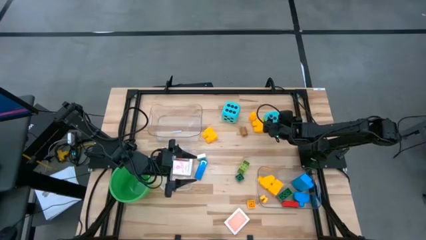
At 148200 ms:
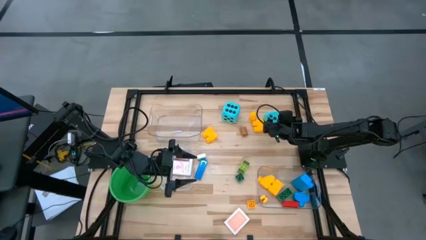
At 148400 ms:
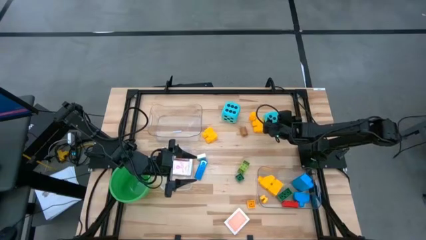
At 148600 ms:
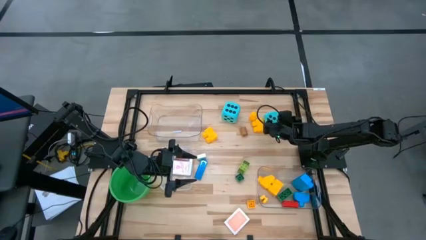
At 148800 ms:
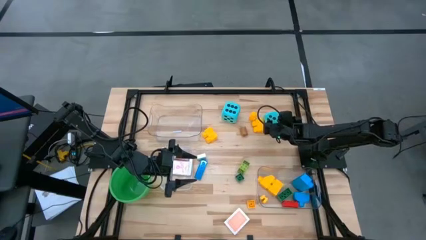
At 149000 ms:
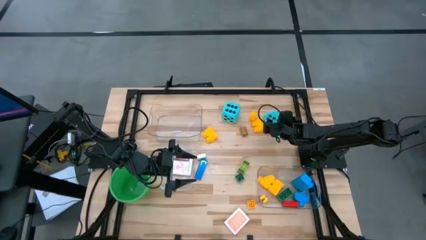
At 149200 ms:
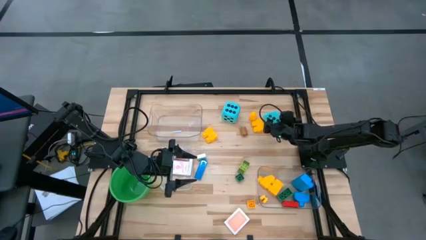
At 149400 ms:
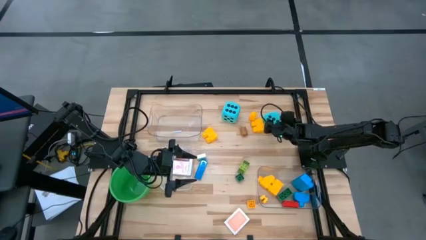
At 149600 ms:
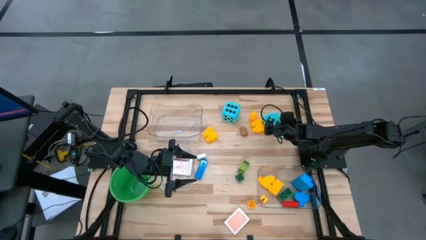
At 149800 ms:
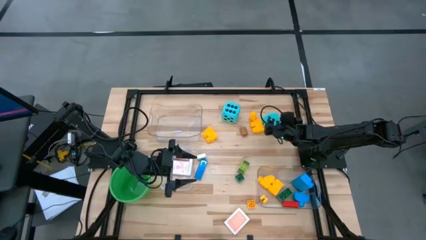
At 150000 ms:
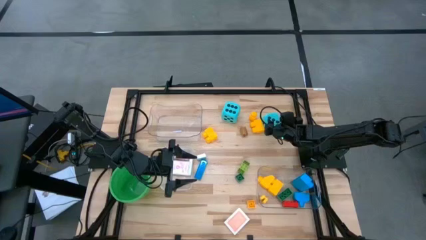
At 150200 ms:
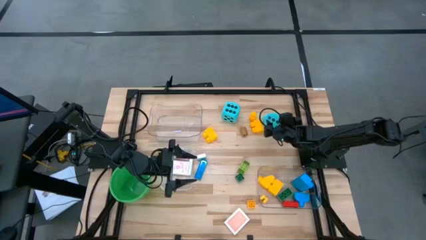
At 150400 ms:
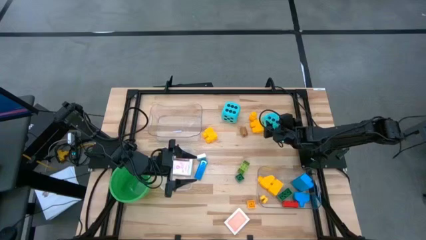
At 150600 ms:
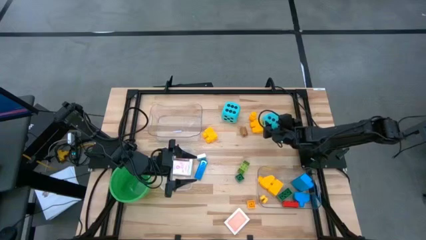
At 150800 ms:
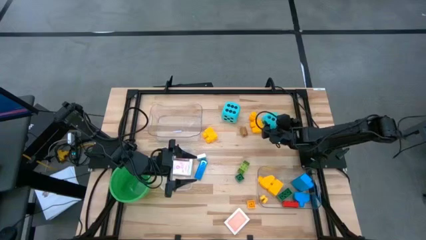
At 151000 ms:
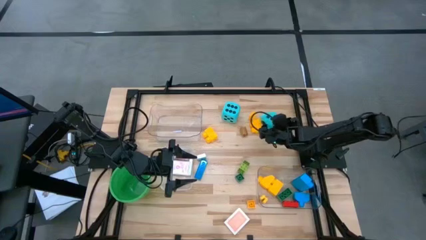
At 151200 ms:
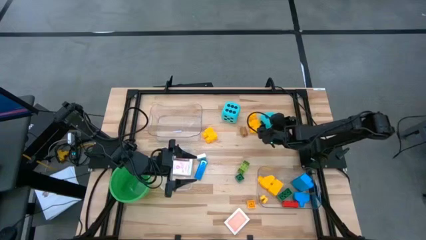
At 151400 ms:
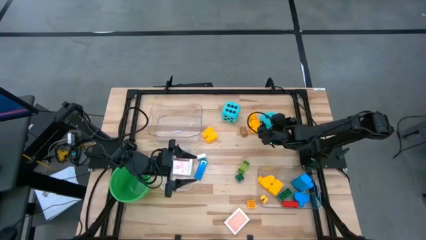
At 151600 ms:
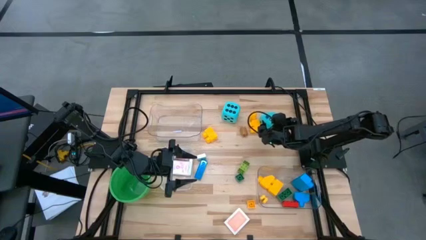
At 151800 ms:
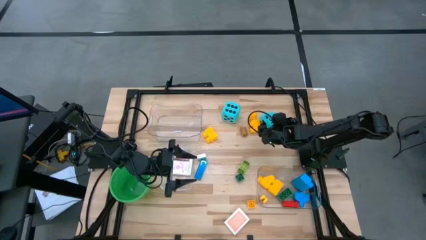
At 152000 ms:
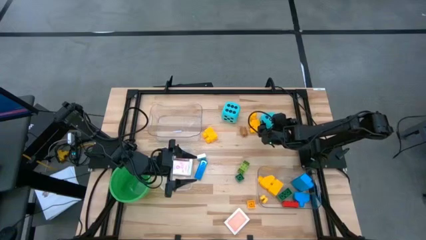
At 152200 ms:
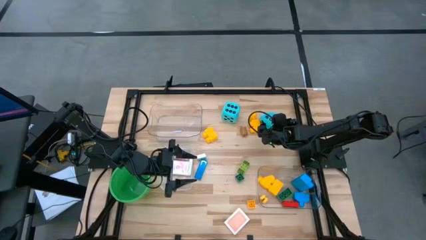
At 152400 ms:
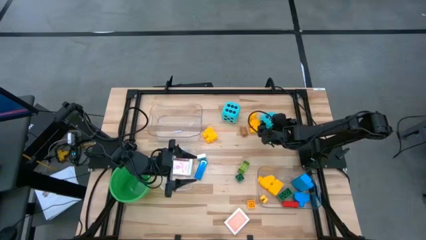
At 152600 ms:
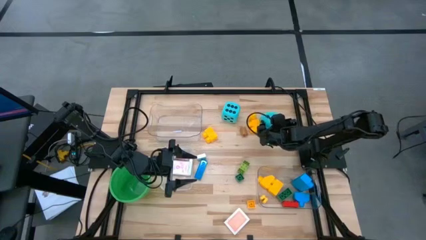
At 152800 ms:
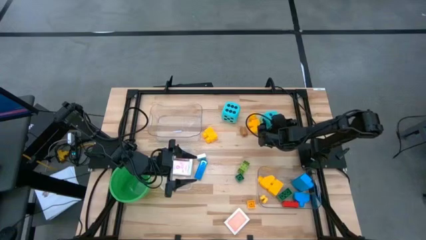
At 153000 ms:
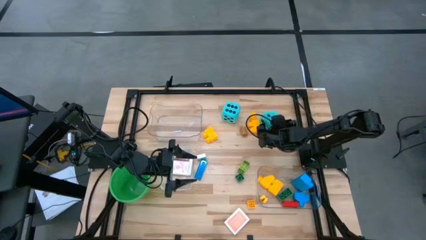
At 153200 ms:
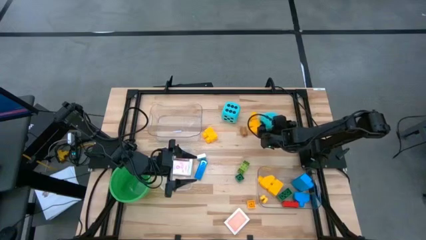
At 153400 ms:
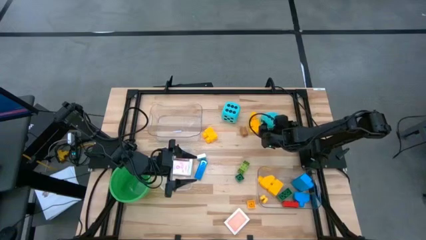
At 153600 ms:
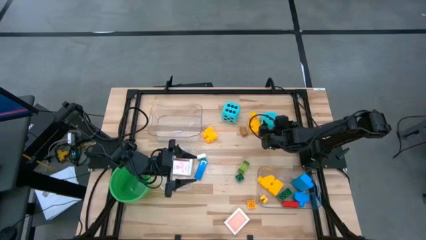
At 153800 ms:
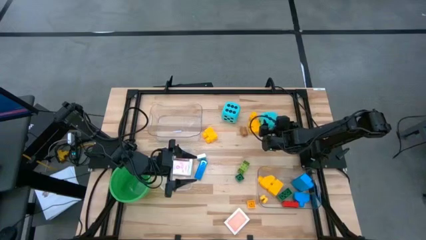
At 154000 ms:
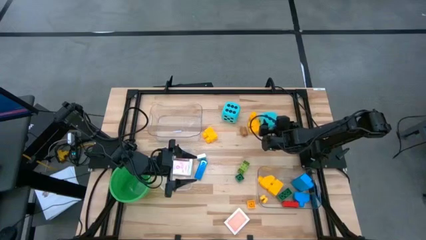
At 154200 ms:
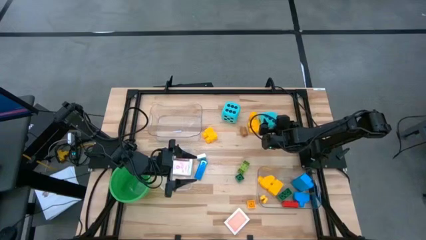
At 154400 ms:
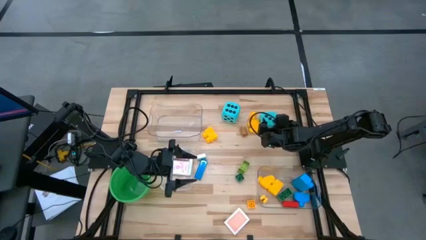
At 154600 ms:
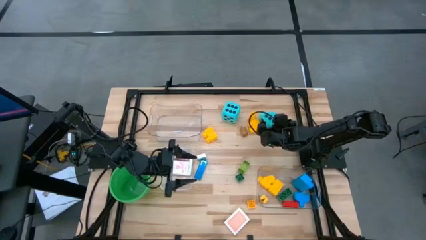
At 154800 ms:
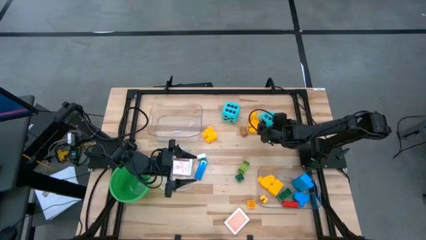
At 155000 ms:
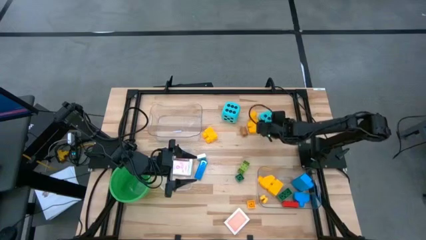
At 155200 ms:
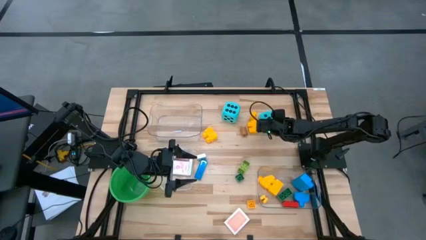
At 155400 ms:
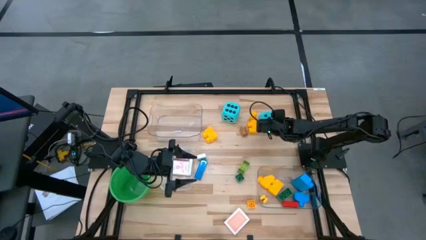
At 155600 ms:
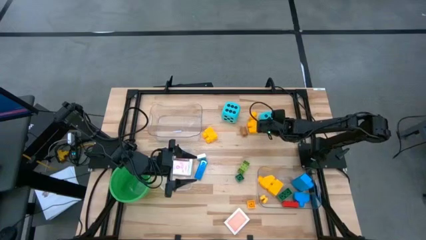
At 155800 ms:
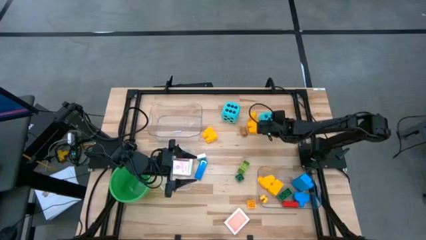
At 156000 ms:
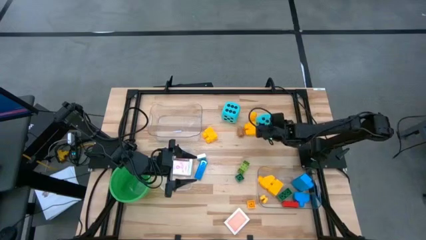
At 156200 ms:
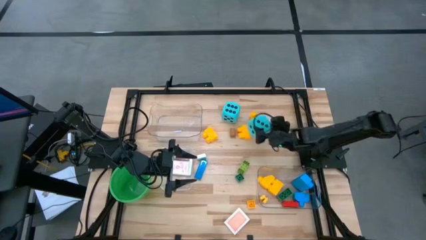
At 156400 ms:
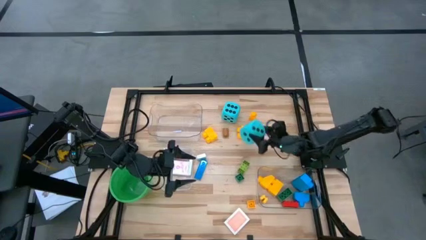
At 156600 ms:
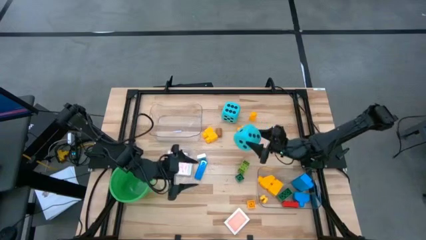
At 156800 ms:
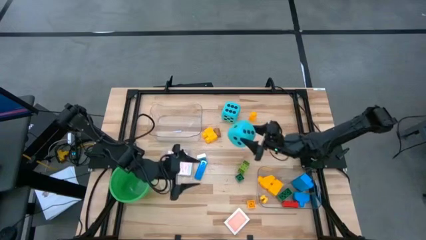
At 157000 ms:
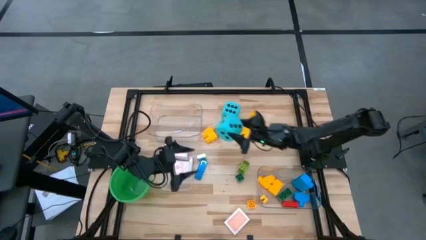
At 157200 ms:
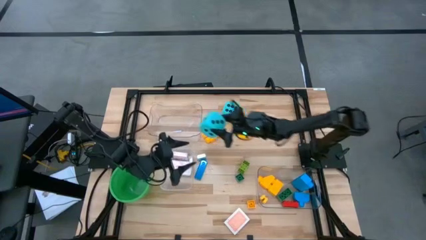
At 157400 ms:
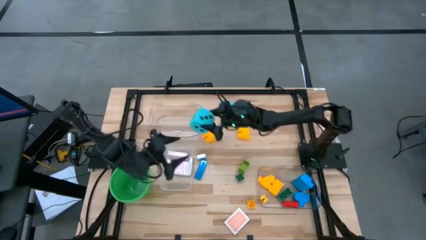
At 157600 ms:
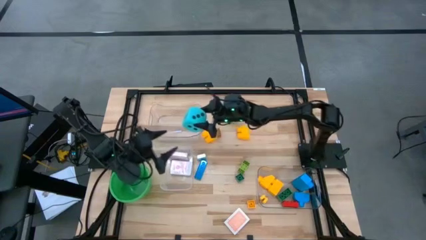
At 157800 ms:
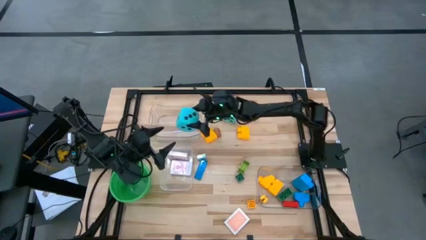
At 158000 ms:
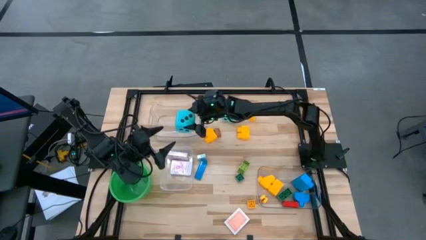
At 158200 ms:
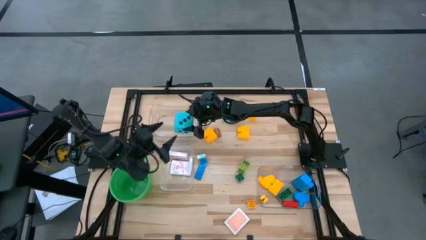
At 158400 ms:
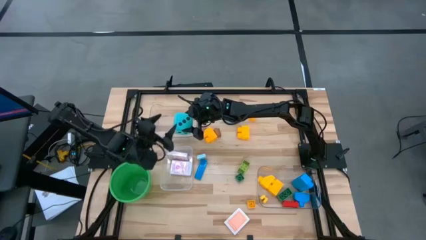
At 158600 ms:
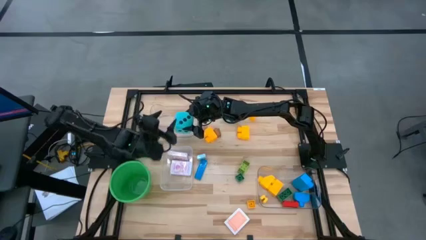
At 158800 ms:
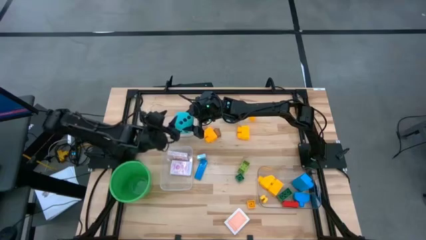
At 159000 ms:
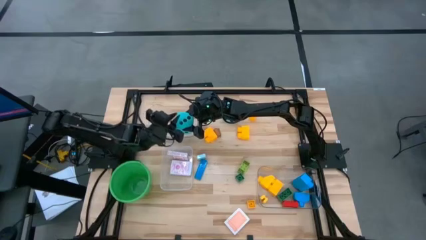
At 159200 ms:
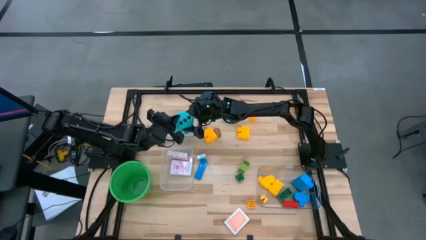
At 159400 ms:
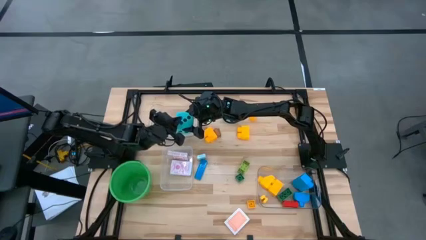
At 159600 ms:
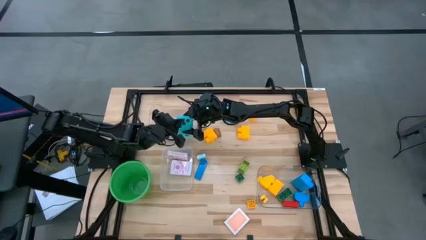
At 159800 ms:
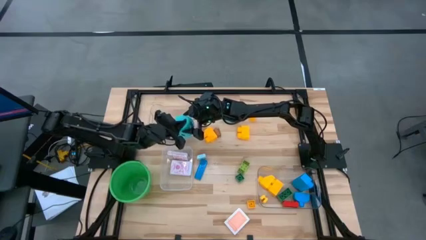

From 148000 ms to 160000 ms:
Task: Pick & Place Toys
Put the light blue dice into the top transparent bin

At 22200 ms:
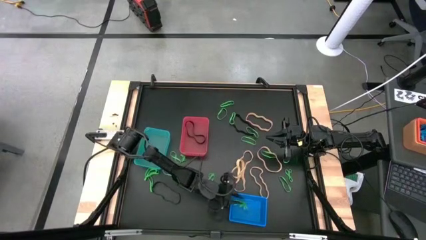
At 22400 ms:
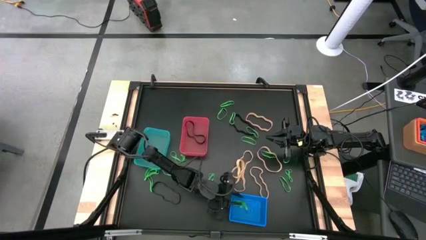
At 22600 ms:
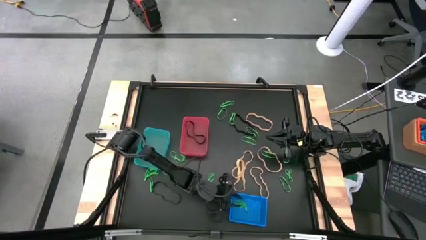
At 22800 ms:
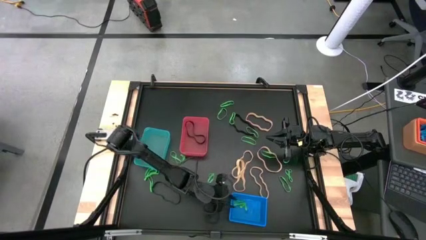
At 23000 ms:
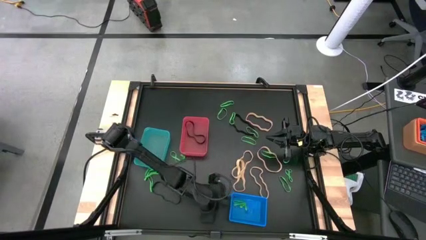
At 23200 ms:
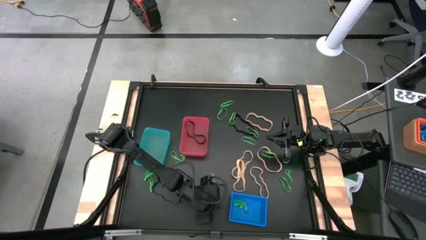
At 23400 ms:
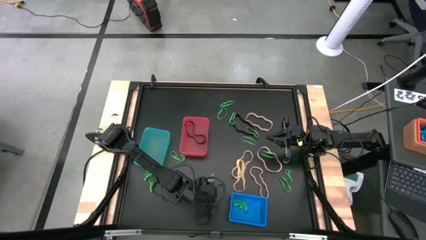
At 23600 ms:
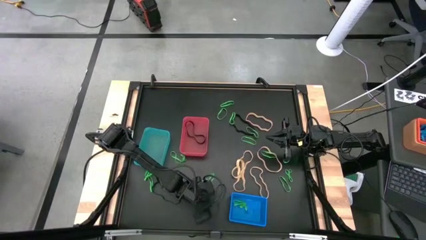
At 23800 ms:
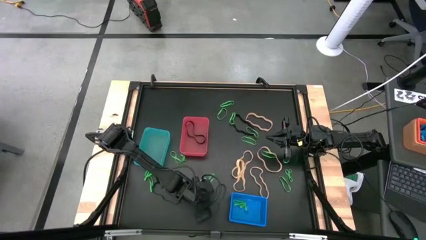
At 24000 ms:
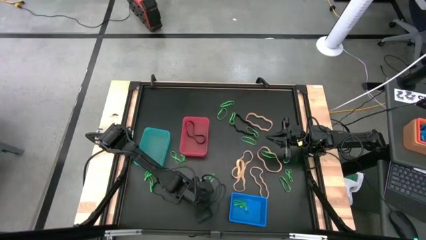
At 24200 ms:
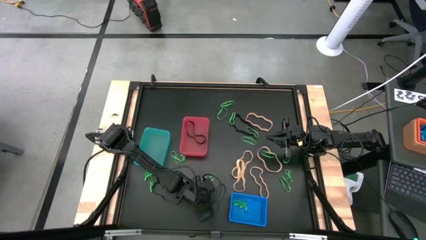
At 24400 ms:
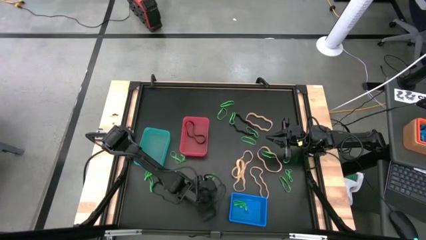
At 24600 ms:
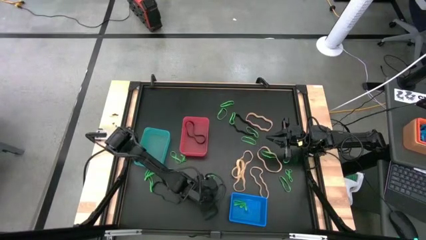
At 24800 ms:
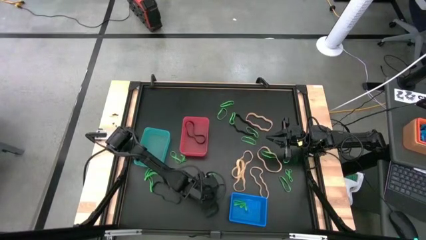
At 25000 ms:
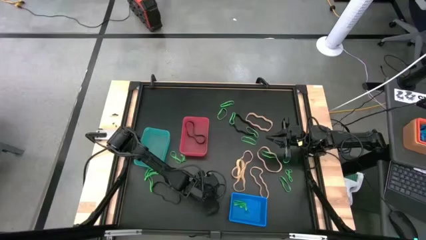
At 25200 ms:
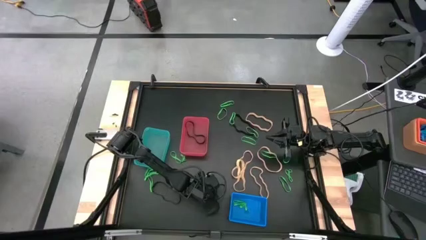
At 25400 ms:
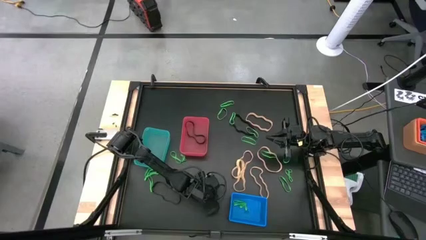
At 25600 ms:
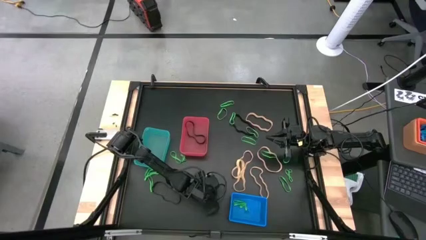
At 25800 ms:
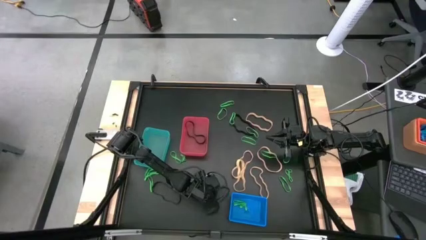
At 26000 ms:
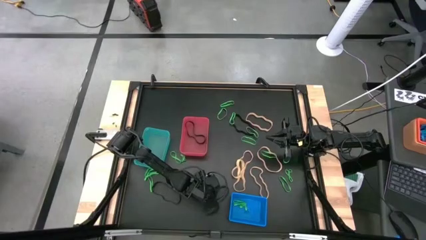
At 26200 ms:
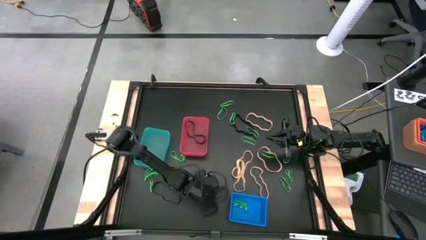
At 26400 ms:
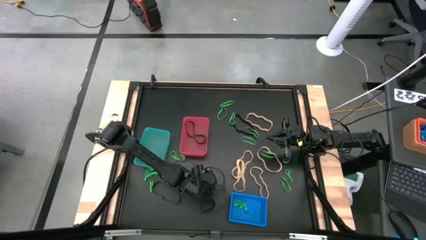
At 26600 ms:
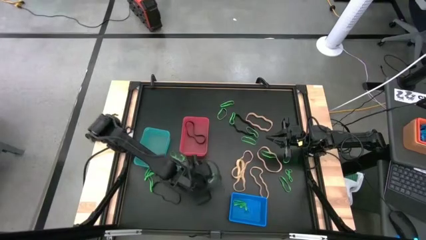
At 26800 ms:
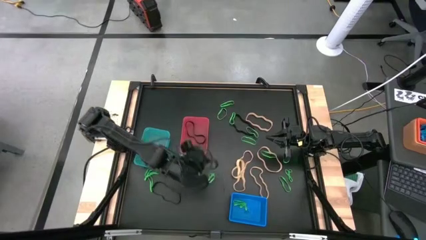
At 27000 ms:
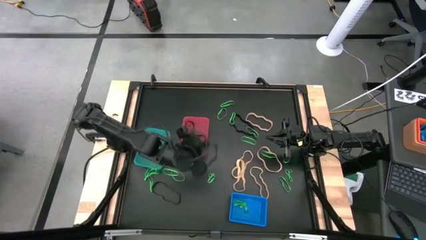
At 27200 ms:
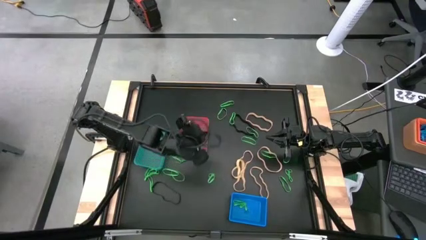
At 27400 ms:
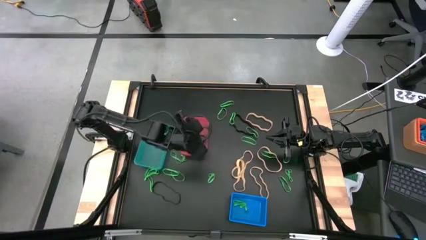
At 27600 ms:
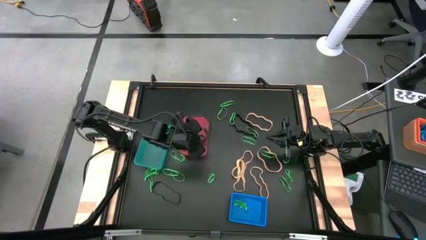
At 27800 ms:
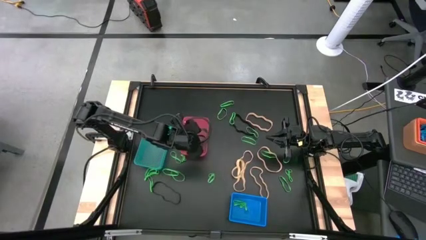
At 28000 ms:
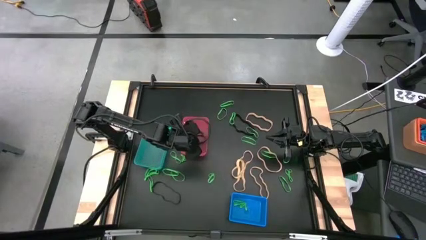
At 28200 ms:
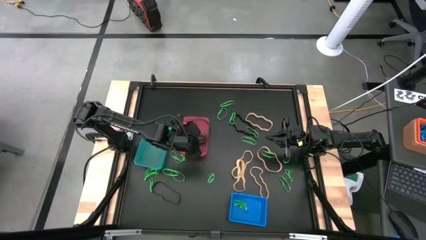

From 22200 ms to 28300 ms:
Task: Sort rubber bands into baskets
Put the black rubber band into the pink bin
